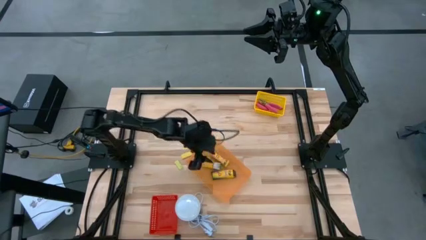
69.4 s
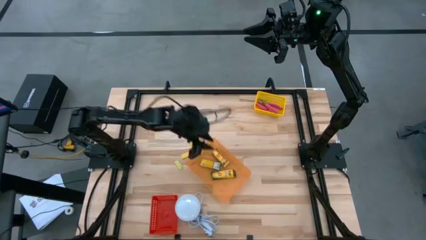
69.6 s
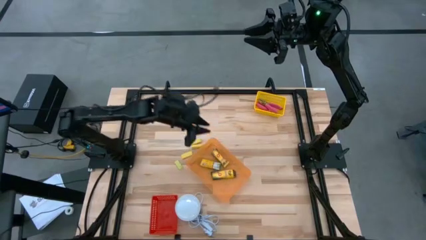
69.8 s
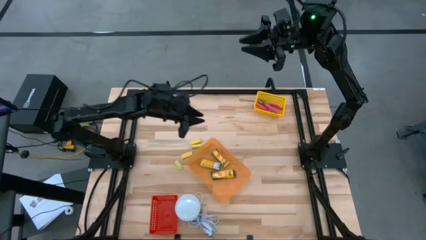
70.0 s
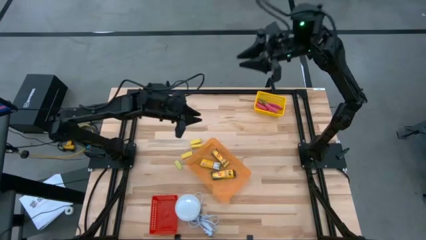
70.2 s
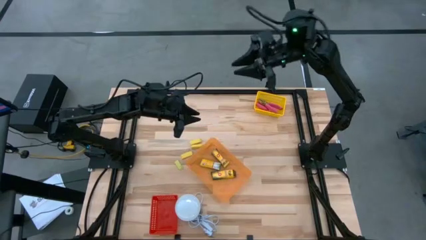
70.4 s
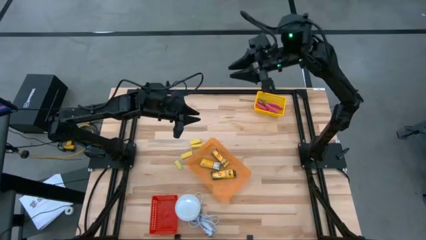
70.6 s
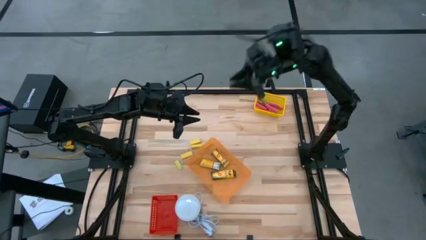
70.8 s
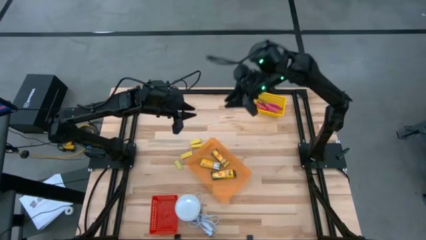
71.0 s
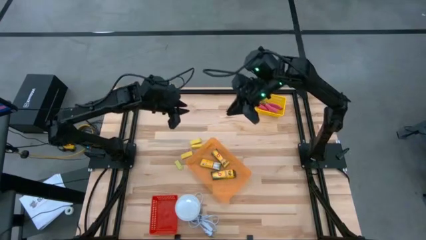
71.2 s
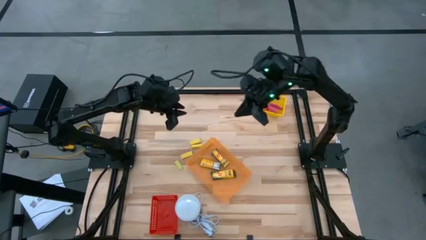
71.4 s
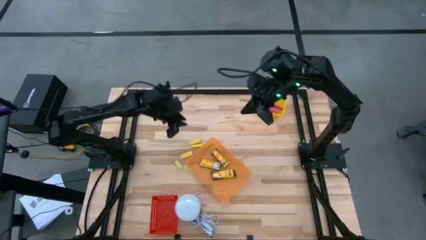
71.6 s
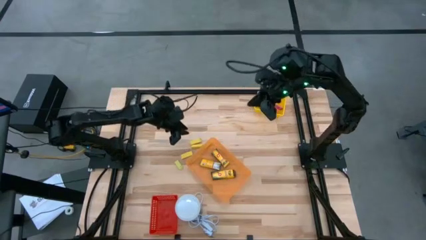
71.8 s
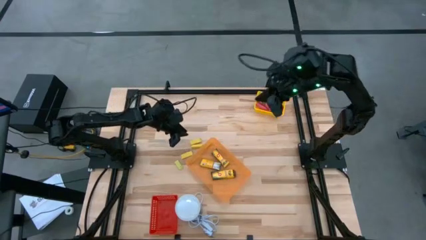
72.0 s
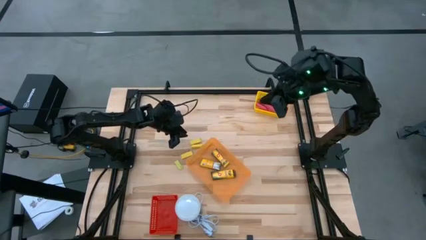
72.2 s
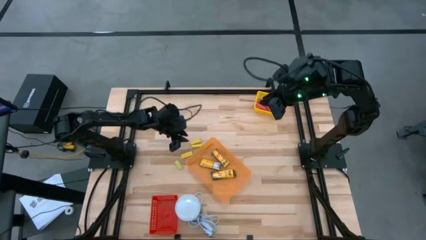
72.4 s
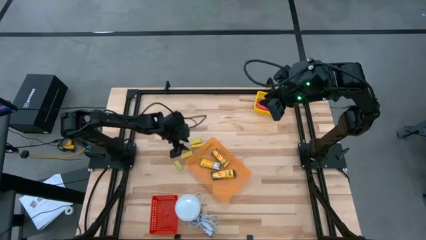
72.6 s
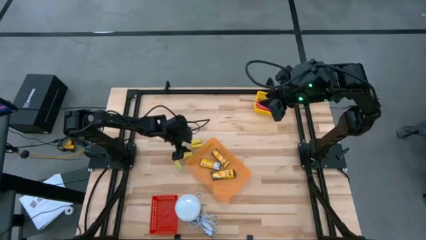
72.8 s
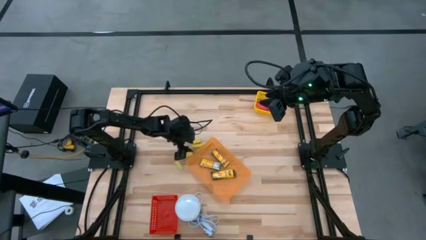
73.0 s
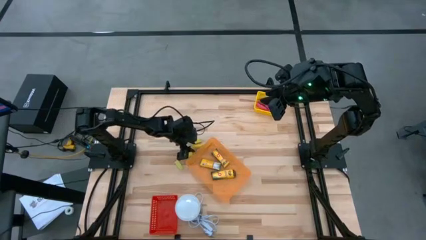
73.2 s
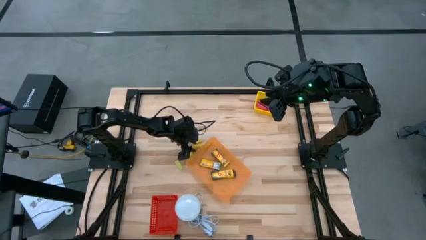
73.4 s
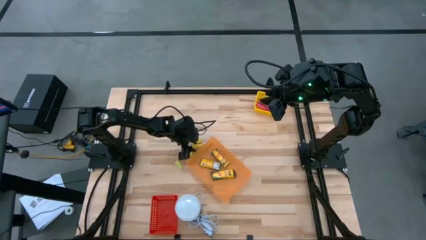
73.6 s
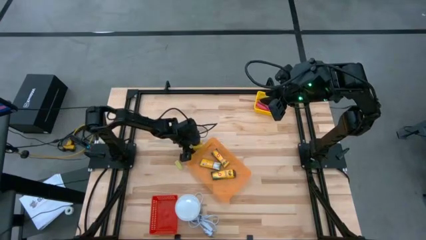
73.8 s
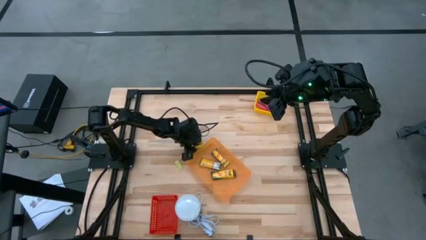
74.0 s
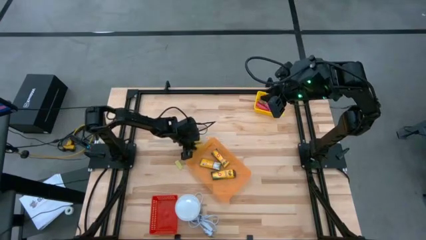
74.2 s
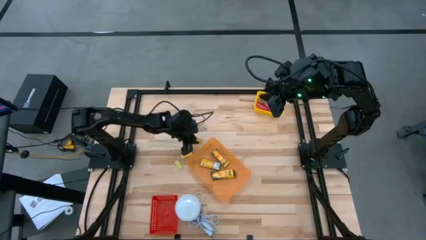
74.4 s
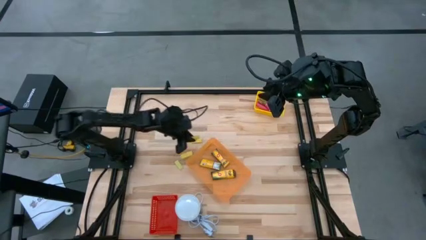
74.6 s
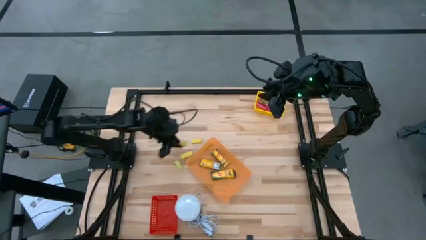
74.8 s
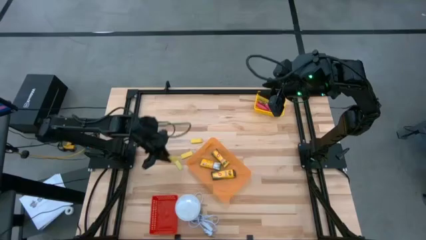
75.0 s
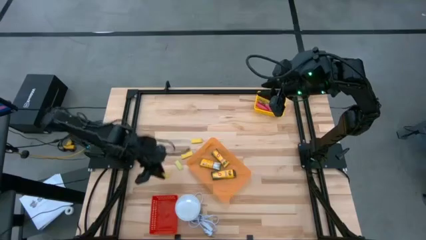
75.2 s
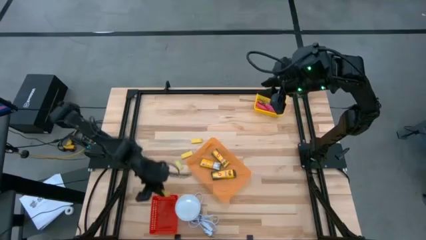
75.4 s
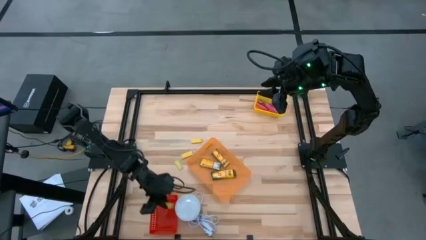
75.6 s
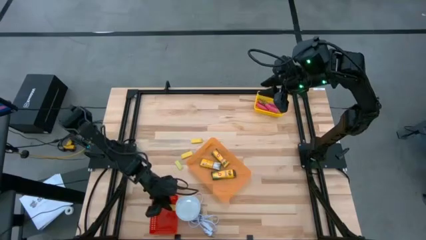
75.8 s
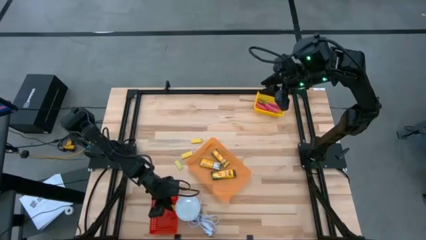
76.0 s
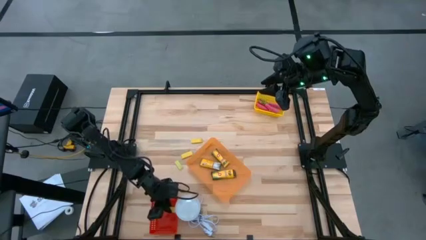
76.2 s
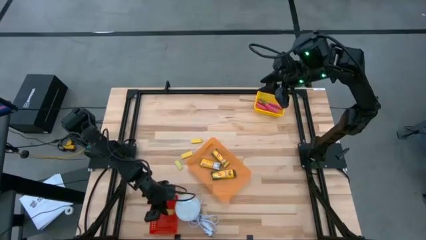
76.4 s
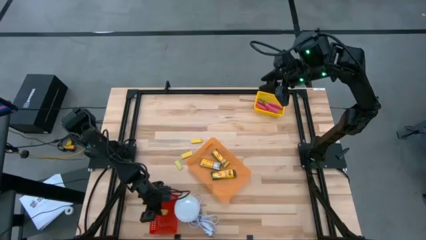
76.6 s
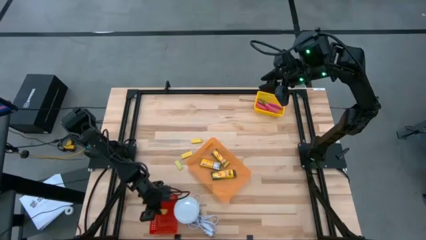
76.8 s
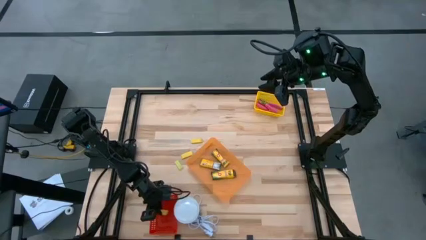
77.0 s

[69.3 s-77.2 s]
Task: Pick & Place School Supplies
Put the yellow eraser into the red bin

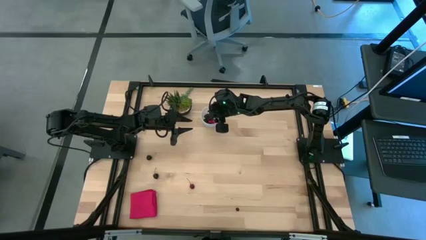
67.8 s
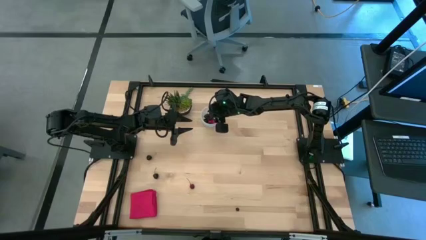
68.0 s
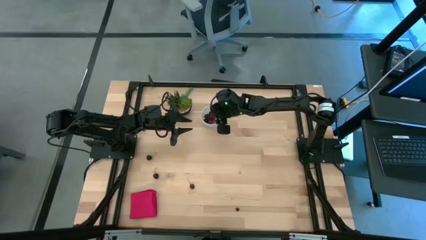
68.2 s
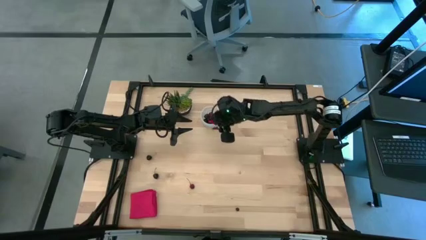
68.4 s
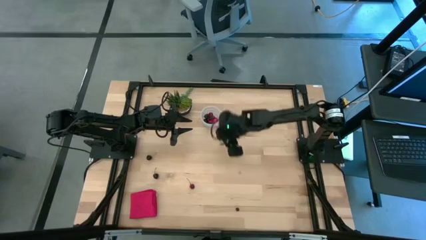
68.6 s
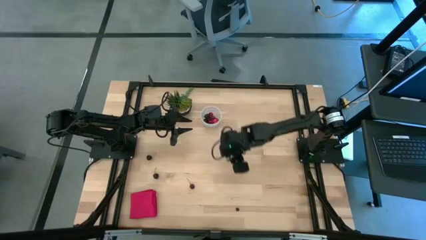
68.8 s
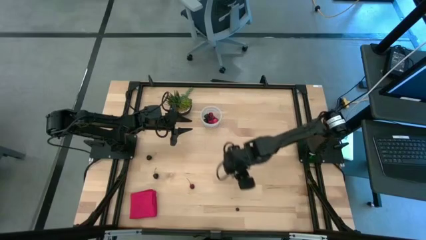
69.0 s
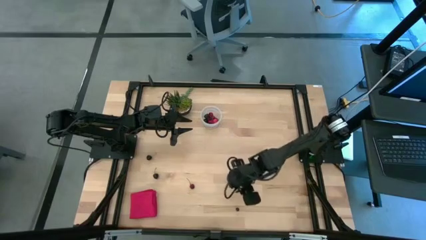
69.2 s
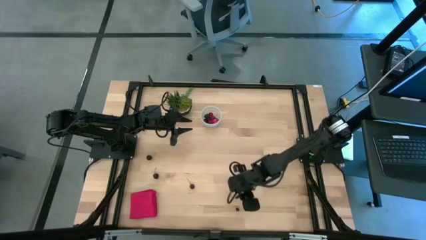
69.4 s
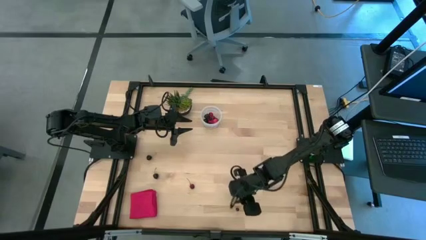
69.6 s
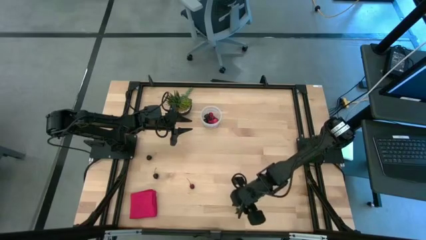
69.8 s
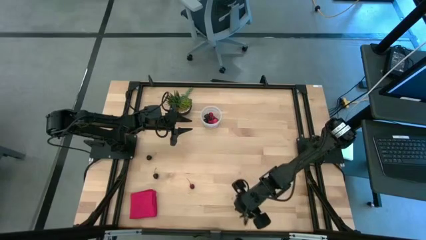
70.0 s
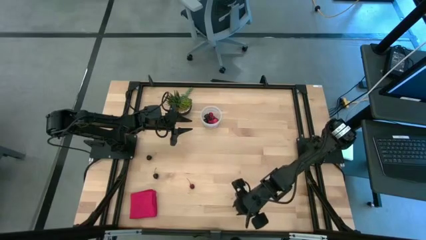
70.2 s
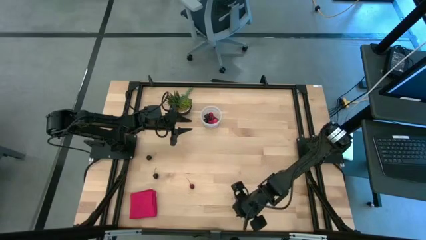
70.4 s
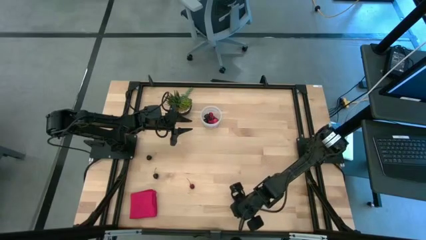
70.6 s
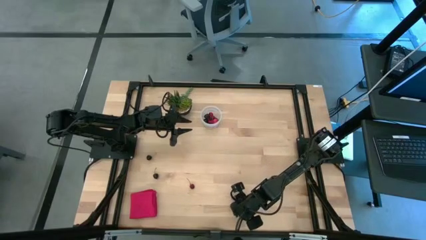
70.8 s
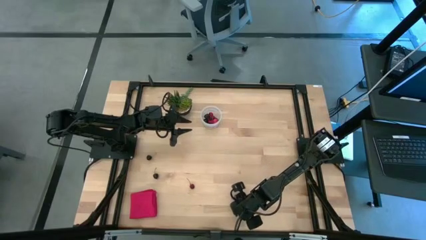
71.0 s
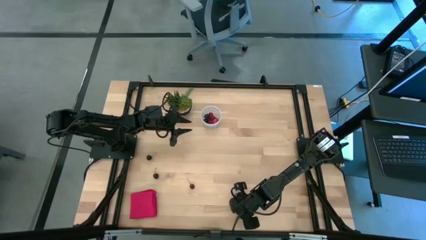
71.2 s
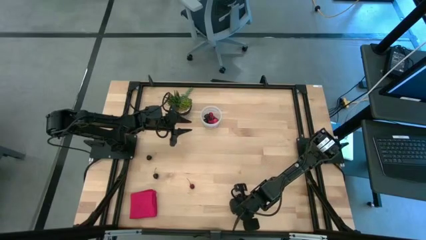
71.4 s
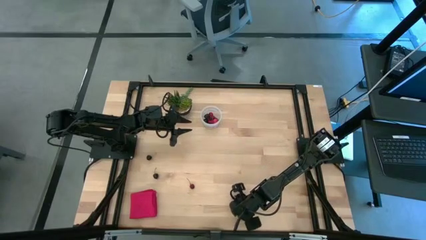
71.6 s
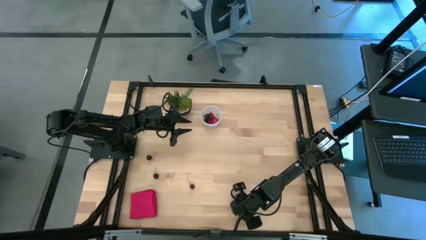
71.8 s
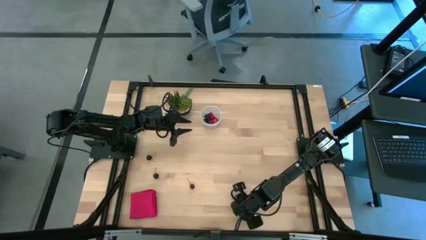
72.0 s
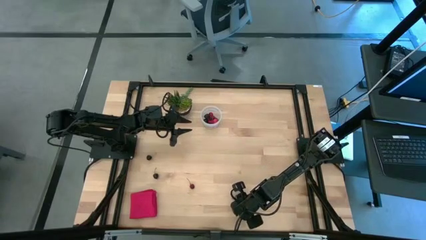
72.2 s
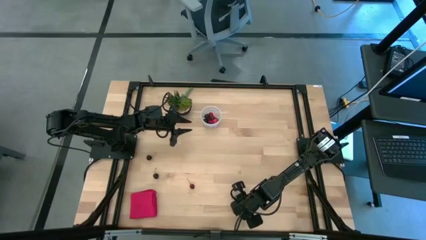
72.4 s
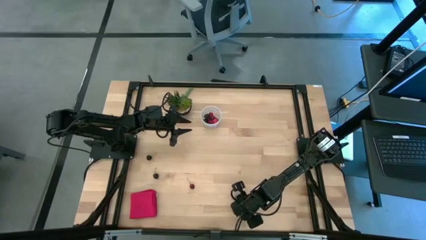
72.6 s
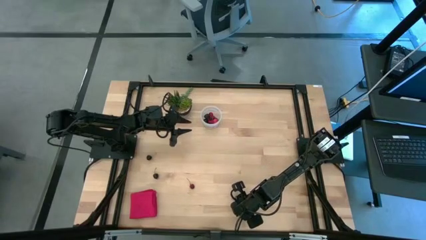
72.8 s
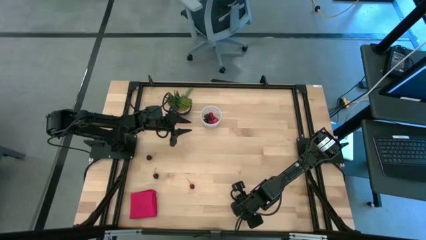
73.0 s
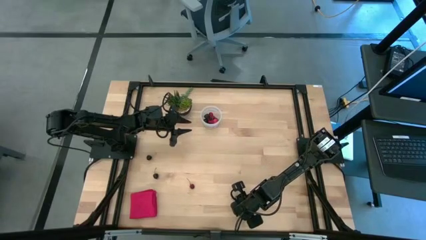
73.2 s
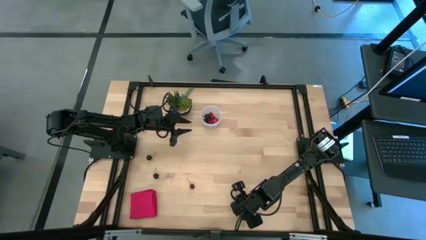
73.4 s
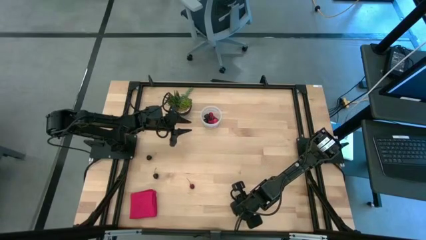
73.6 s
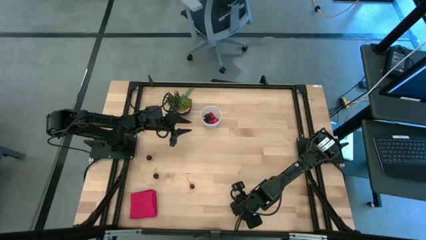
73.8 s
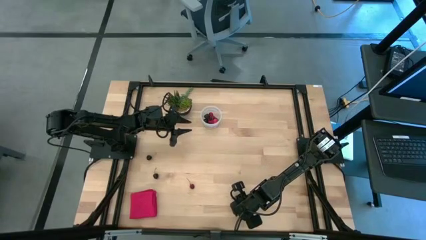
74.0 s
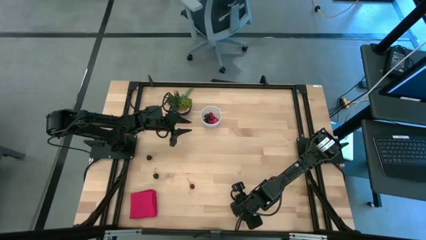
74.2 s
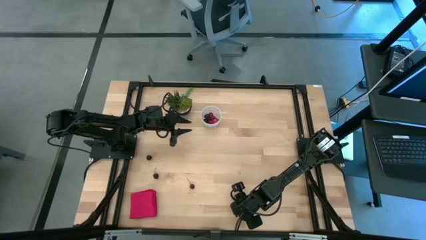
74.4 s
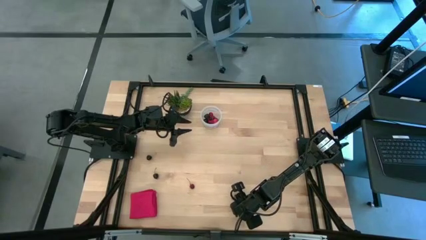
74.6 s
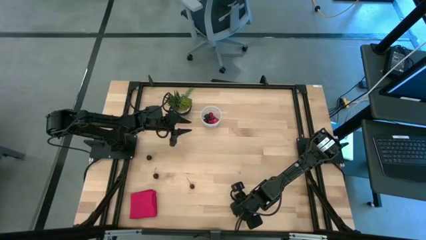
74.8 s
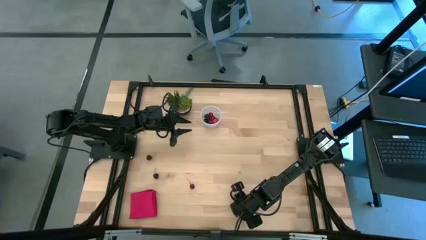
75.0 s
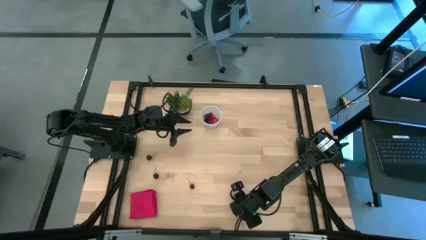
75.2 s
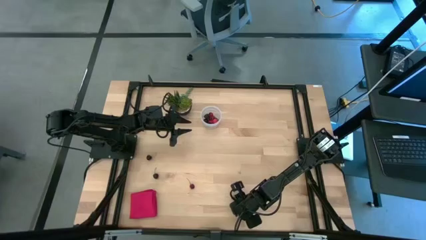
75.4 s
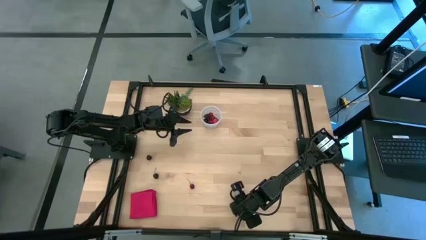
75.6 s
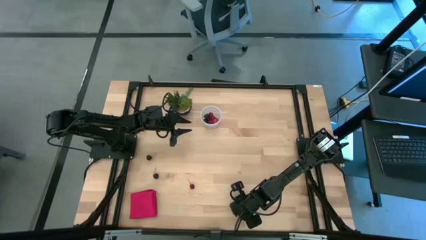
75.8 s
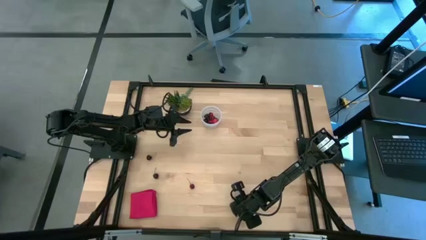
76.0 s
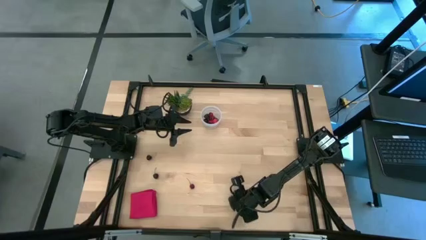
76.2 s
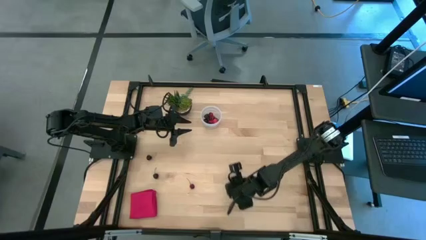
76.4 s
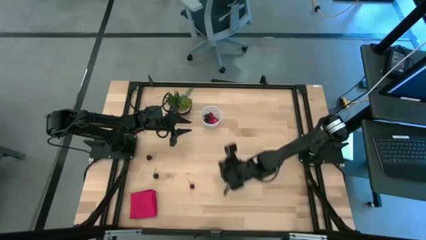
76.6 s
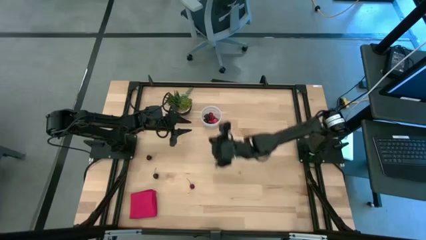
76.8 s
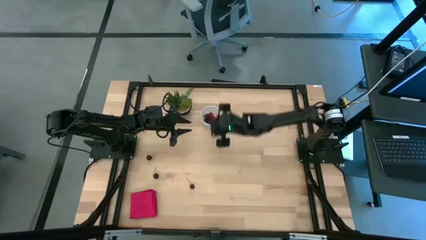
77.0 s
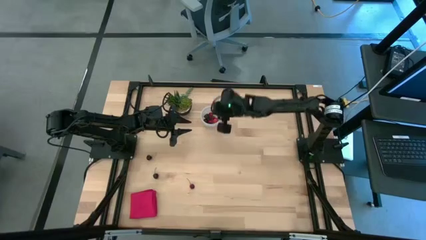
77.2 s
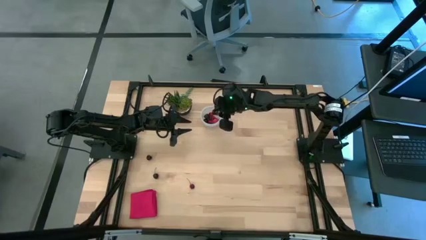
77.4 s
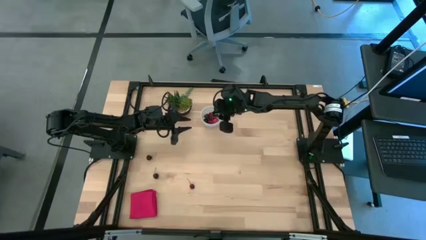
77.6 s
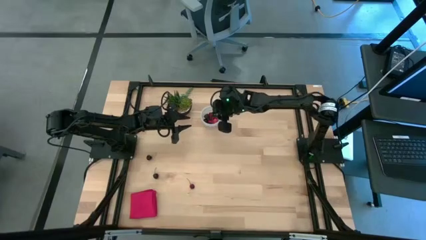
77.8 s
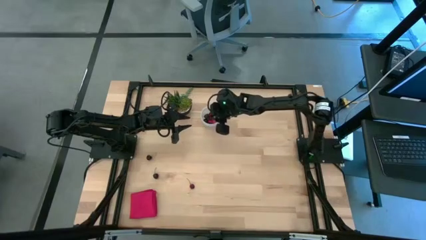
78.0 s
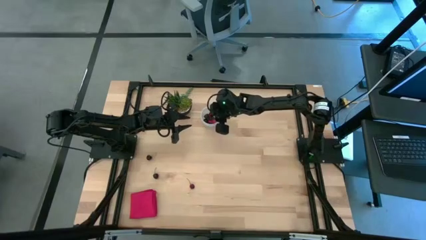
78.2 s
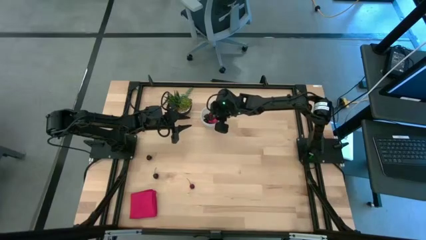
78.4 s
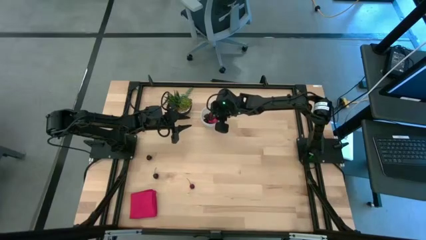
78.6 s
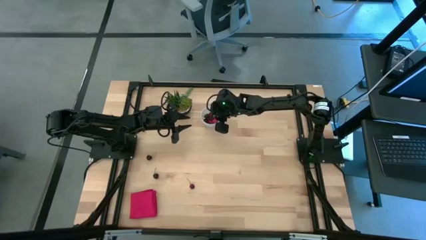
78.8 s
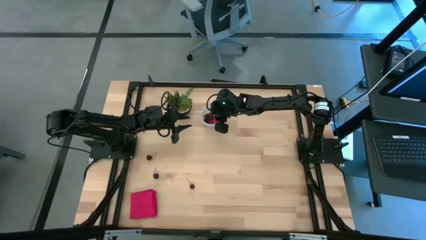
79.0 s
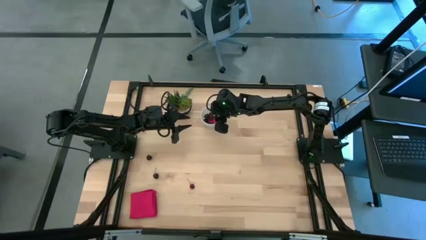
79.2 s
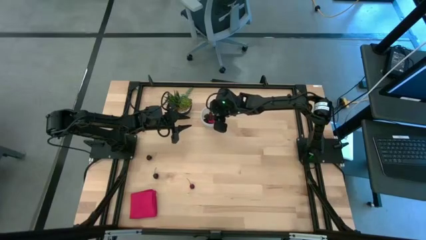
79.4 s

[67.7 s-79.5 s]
Task: Pick and placing Produce into tupperware
Put the blueberry into the transparent container
